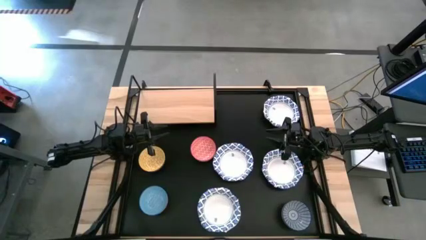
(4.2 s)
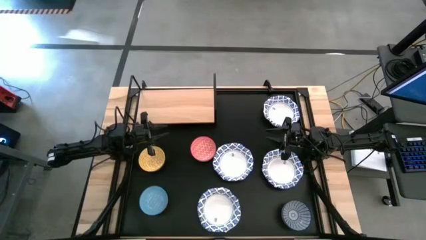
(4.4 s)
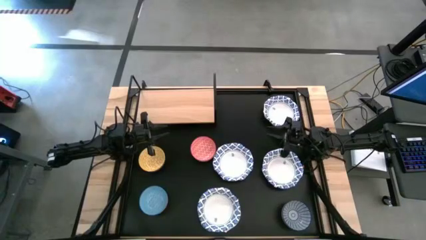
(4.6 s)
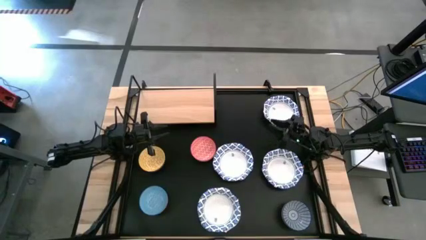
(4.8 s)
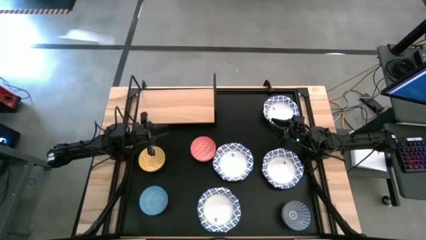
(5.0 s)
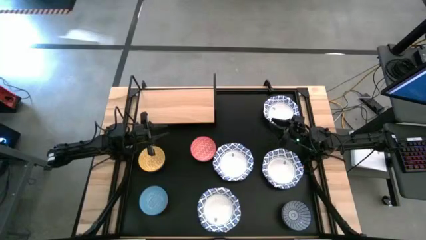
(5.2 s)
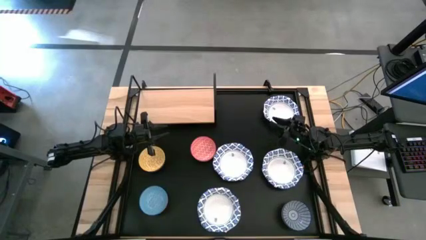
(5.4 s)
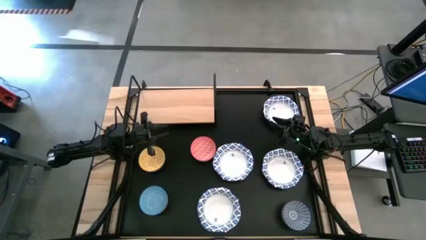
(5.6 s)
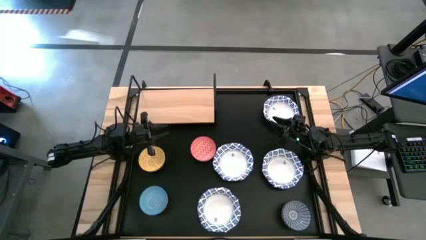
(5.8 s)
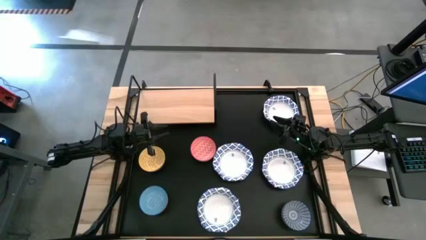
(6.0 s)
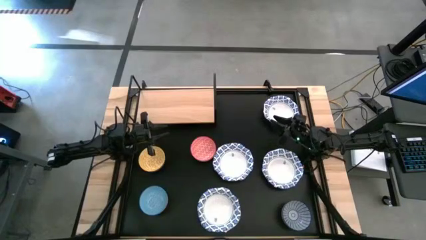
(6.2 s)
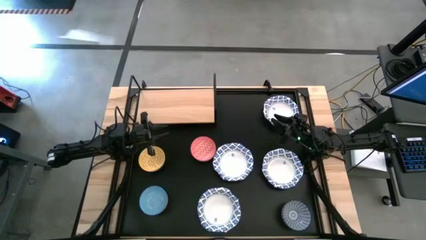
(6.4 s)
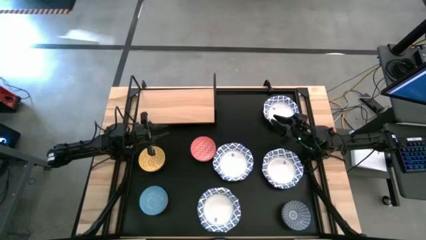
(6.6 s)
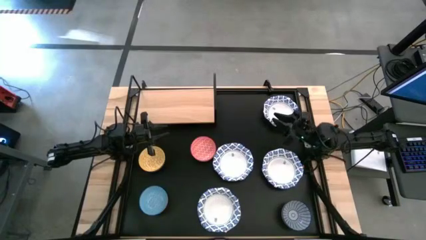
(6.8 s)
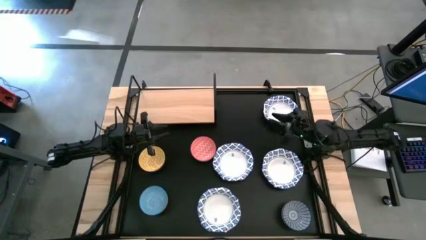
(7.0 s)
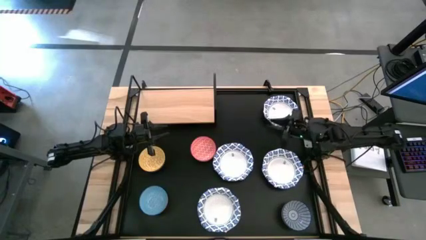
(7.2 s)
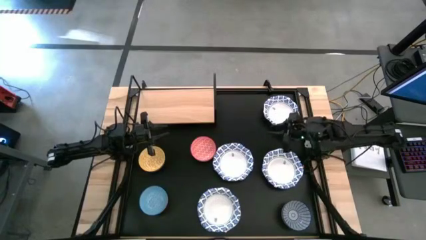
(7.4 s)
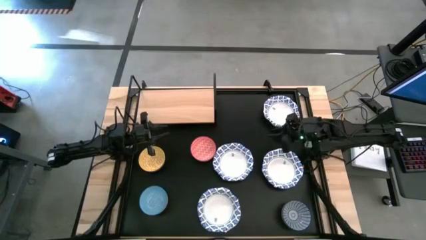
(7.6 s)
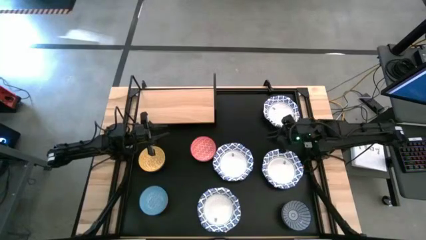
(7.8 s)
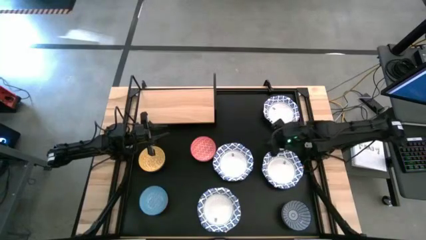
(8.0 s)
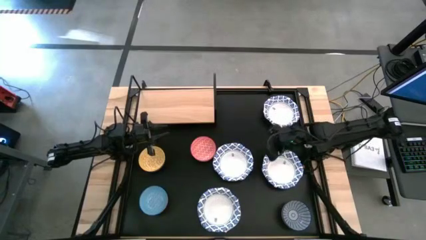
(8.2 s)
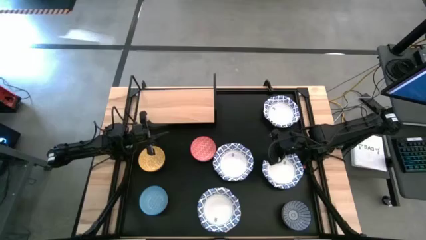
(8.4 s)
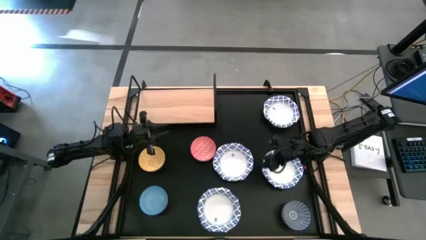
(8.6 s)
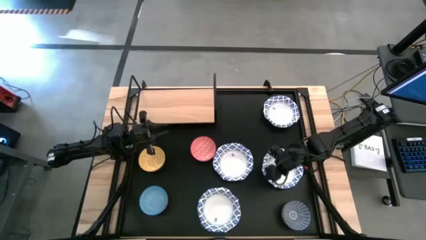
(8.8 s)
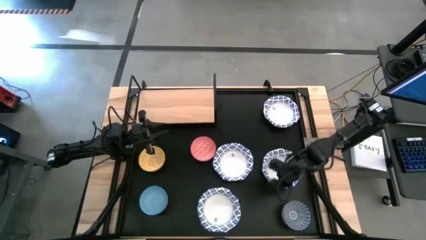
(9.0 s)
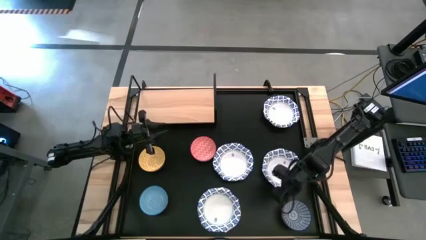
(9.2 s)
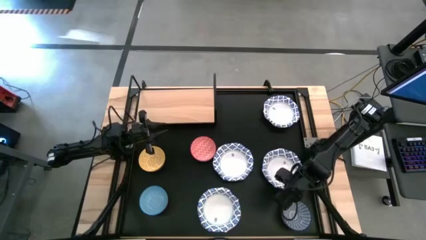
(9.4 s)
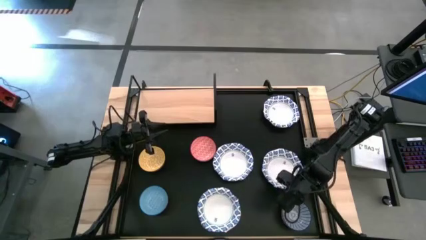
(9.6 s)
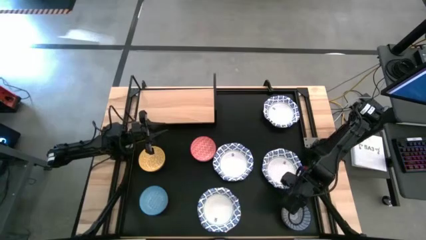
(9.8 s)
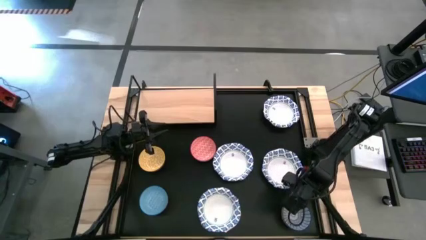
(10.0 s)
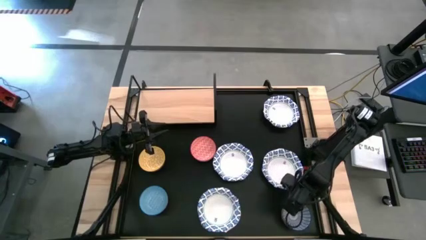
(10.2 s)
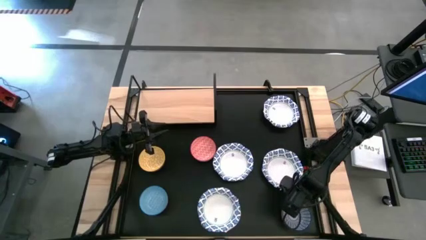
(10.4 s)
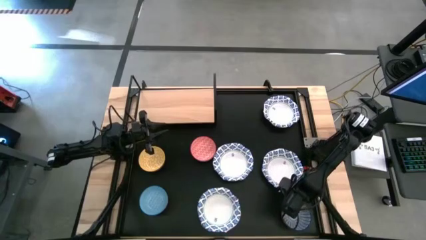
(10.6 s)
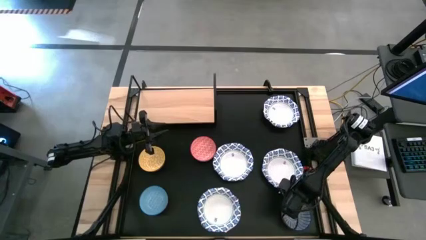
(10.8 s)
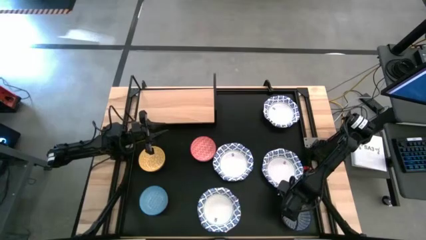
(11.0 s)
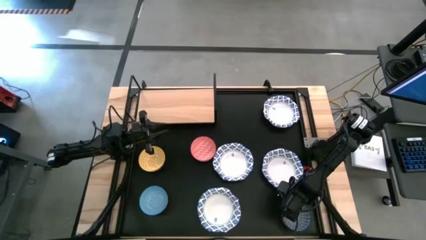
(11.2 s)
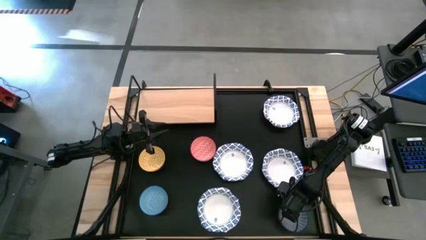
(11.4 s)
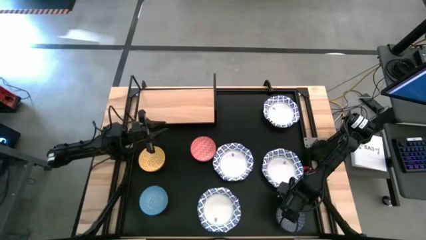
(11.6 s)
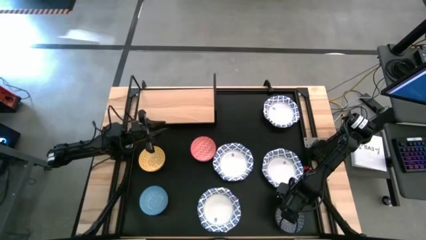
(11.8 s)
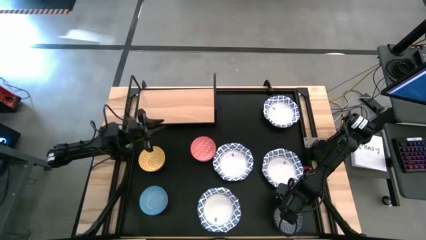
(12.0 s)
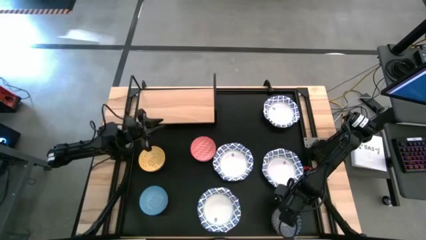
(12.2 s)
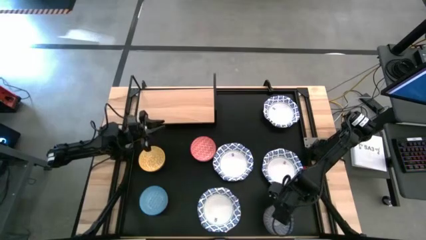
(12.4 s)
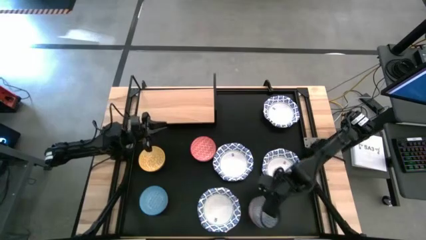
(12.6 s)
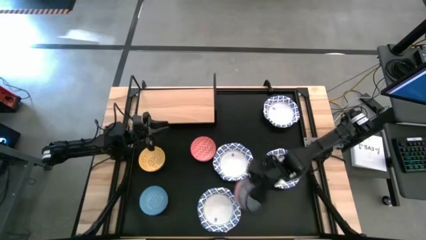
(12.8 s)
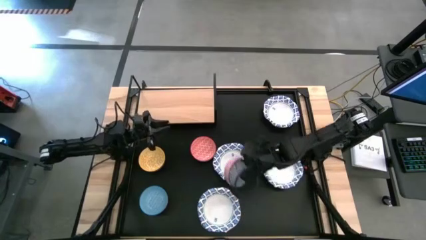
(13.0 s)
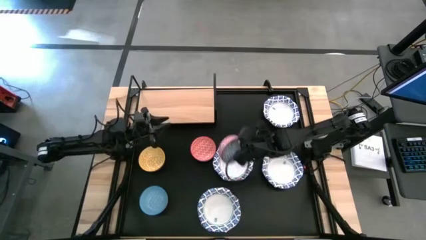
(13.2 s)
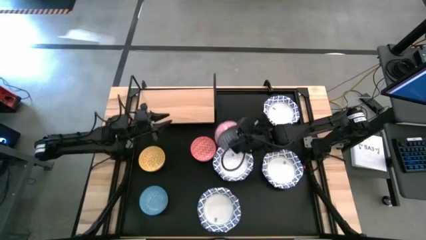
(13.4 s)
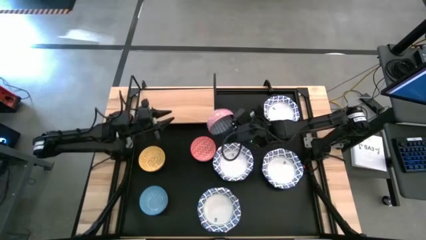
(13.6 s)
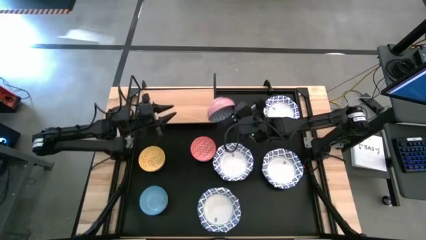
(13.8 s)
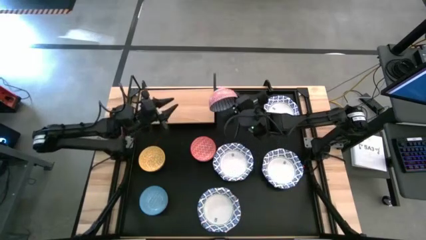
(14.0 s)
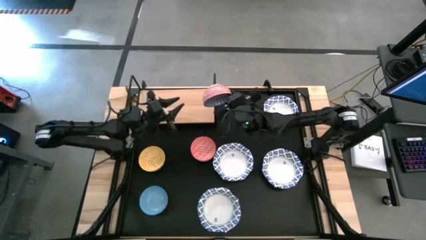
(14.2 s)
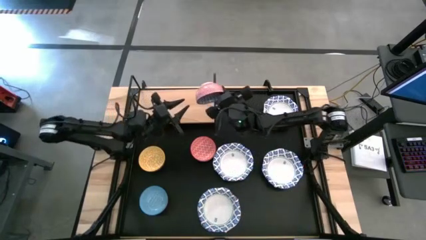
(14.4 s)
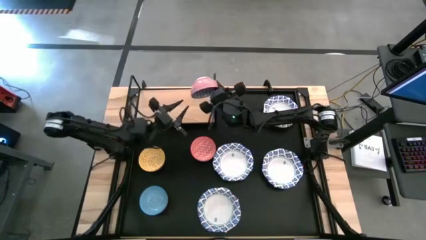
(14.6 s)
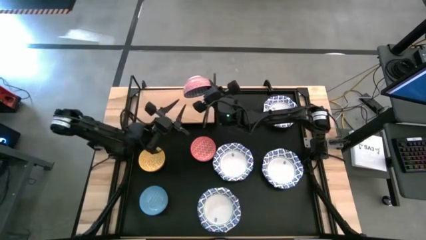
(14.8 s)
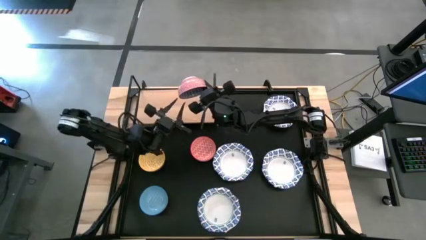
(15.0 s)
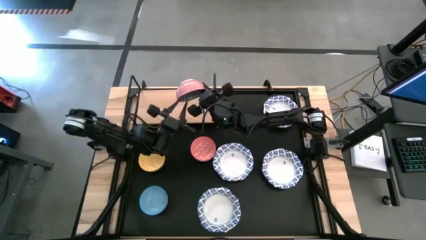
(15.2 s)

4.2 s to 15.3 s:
Task: Place and stack bowls onto a shelf
Put the blue bowl on the shelf
